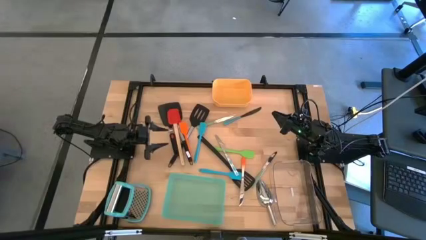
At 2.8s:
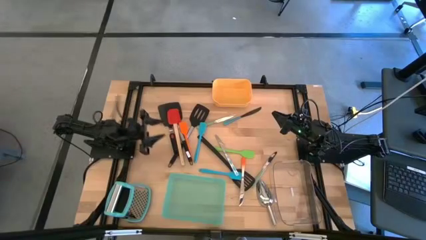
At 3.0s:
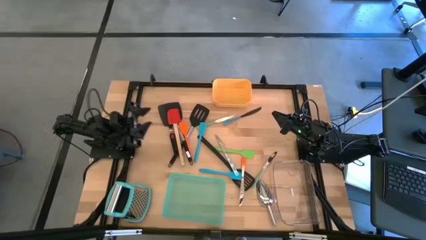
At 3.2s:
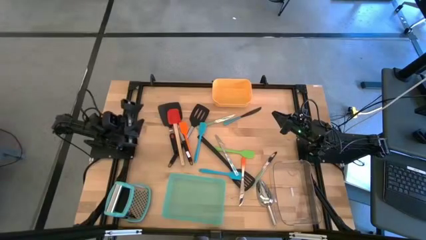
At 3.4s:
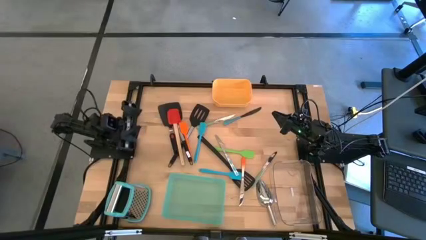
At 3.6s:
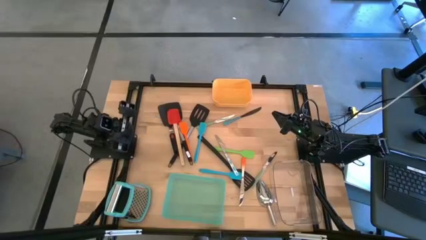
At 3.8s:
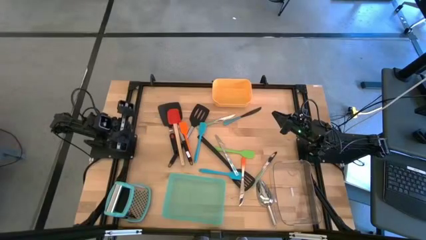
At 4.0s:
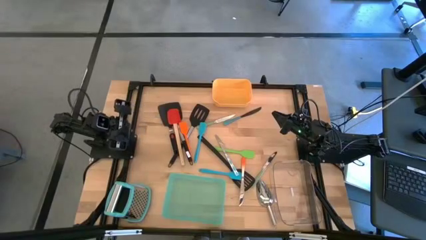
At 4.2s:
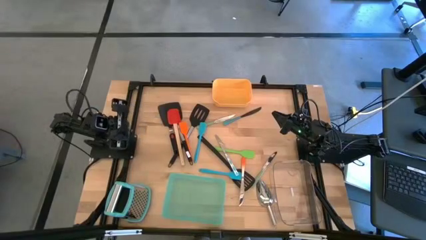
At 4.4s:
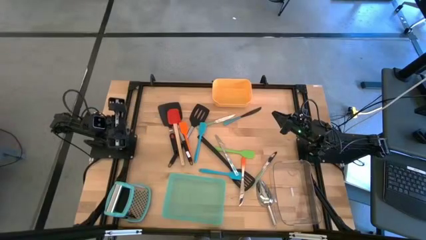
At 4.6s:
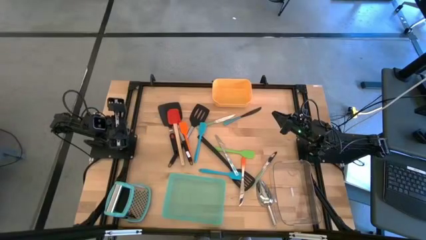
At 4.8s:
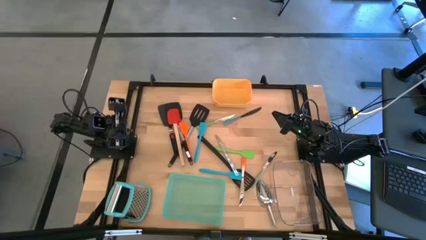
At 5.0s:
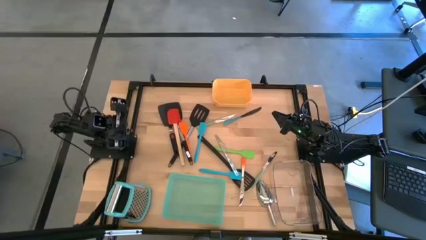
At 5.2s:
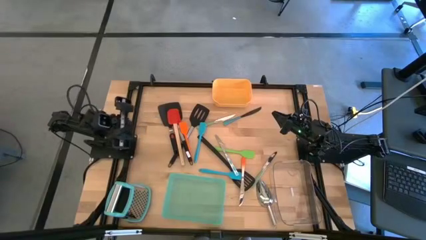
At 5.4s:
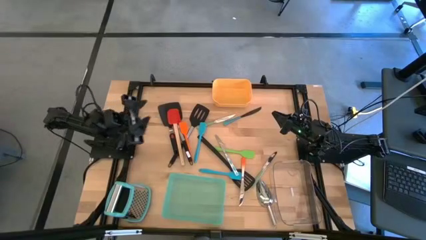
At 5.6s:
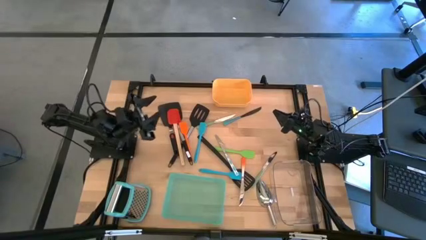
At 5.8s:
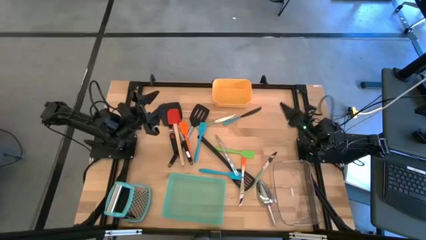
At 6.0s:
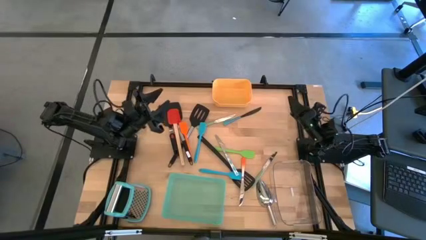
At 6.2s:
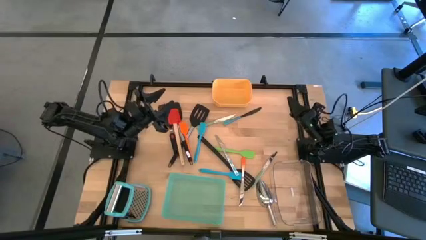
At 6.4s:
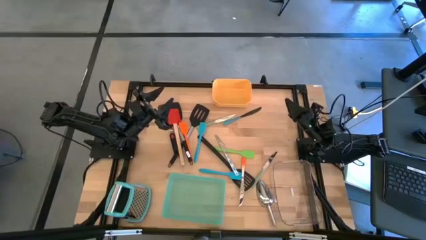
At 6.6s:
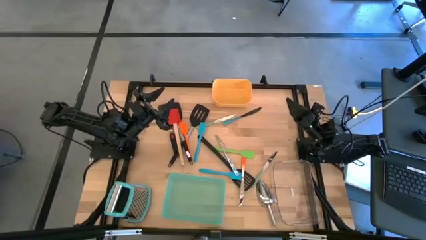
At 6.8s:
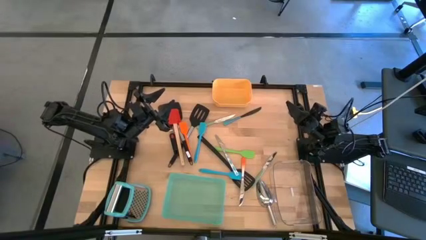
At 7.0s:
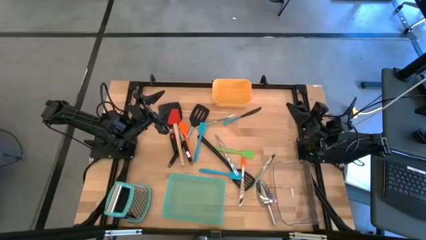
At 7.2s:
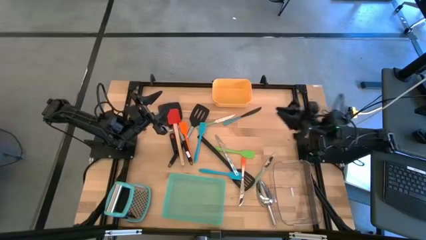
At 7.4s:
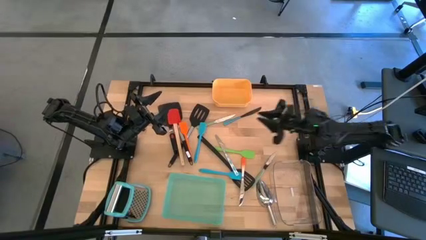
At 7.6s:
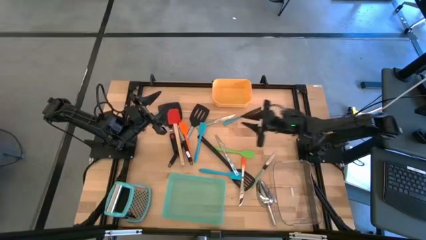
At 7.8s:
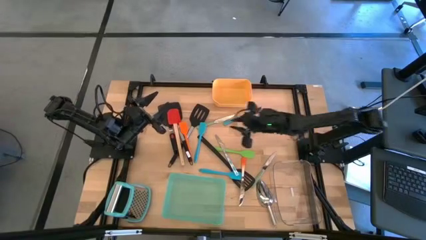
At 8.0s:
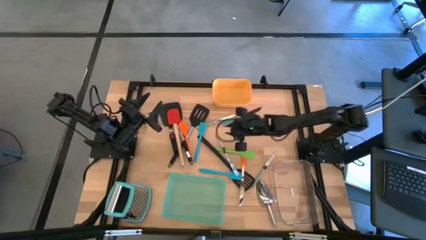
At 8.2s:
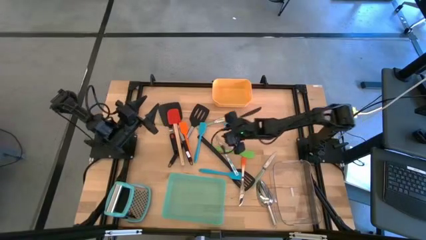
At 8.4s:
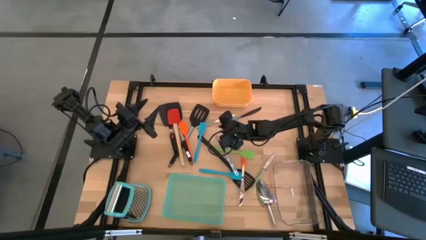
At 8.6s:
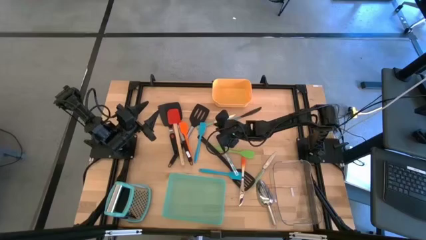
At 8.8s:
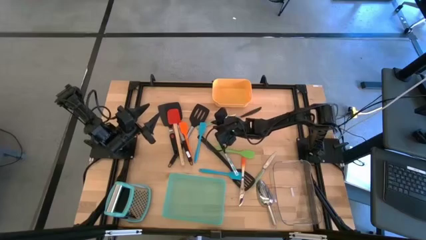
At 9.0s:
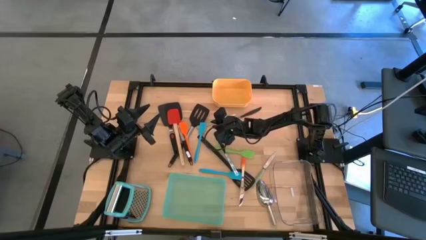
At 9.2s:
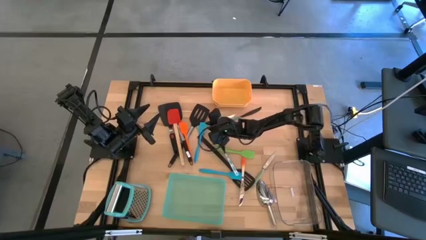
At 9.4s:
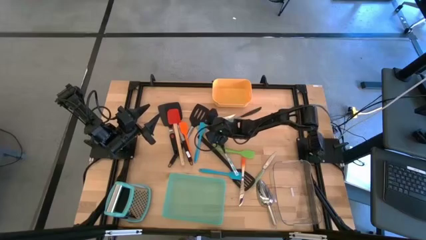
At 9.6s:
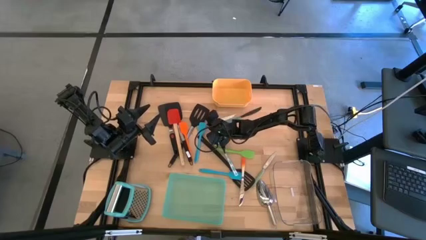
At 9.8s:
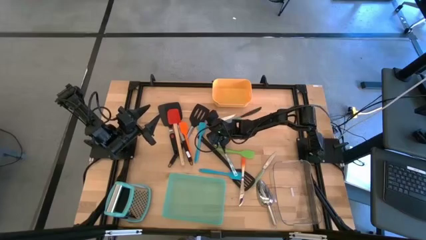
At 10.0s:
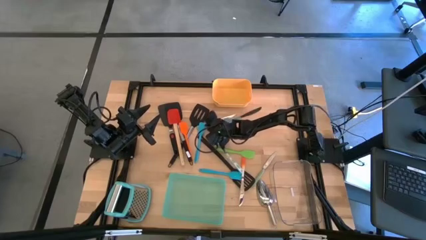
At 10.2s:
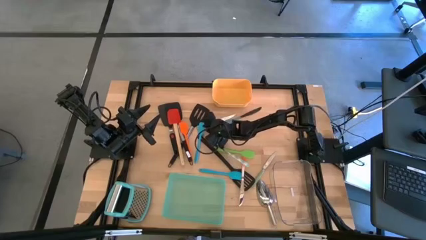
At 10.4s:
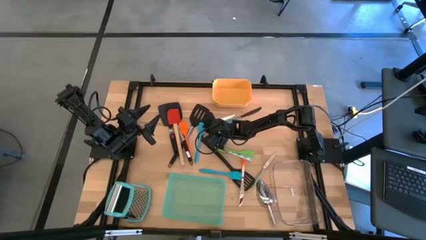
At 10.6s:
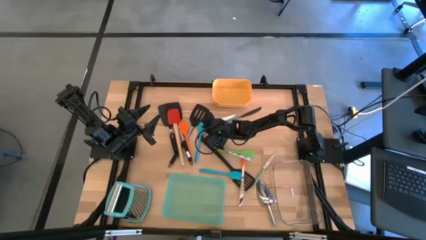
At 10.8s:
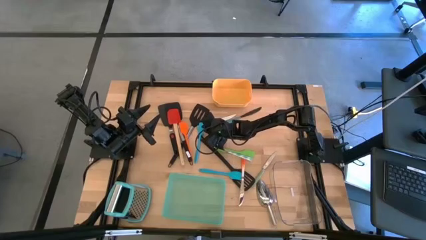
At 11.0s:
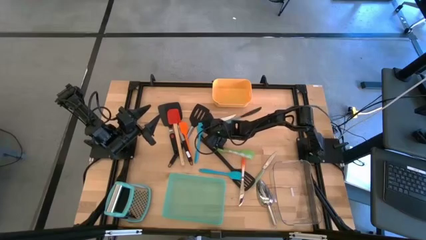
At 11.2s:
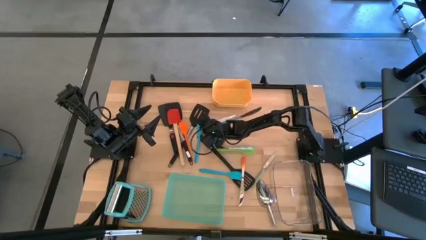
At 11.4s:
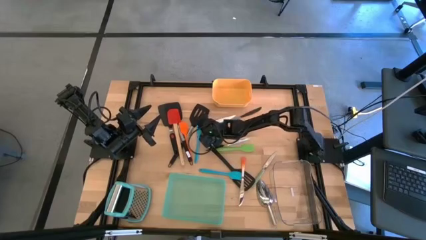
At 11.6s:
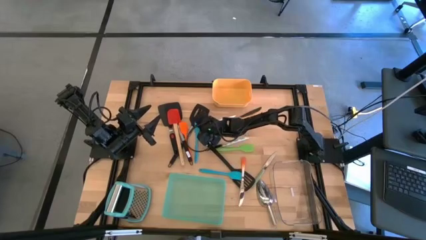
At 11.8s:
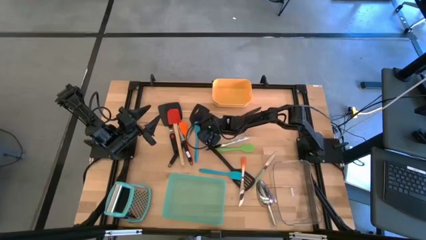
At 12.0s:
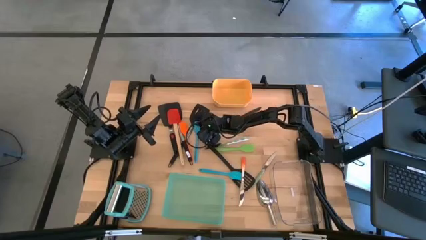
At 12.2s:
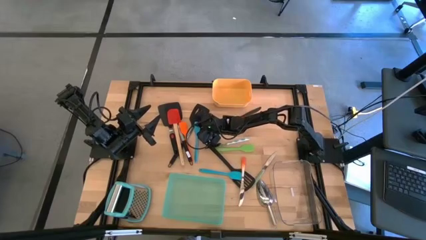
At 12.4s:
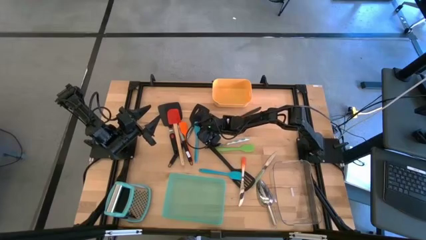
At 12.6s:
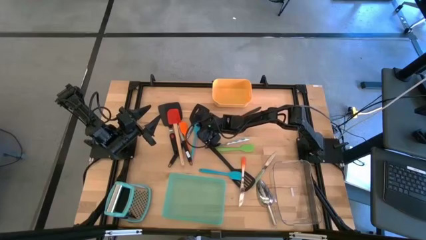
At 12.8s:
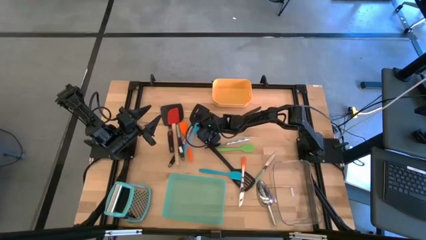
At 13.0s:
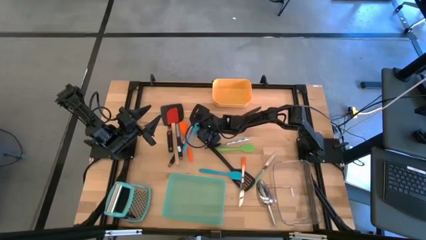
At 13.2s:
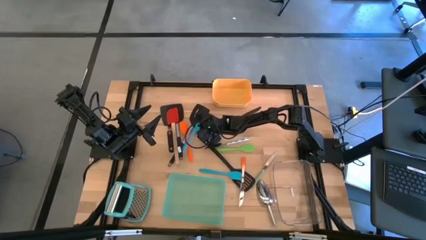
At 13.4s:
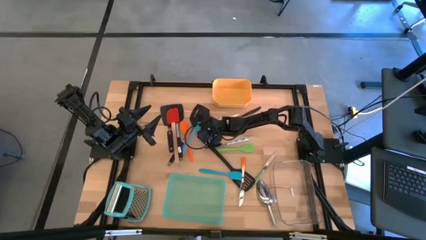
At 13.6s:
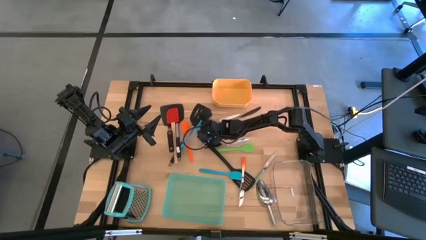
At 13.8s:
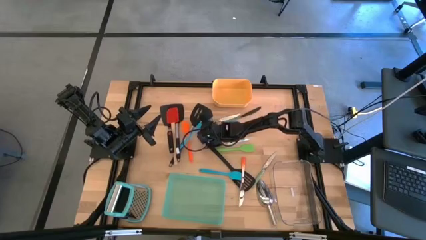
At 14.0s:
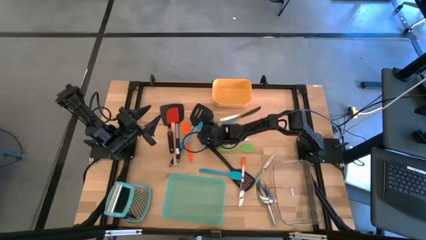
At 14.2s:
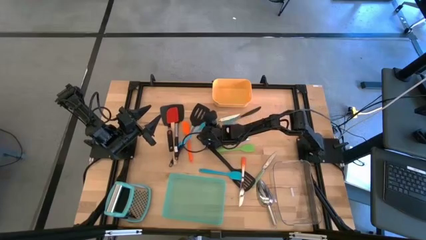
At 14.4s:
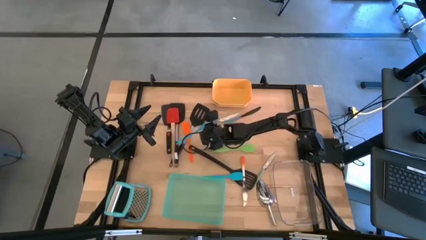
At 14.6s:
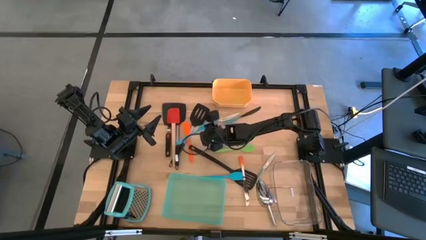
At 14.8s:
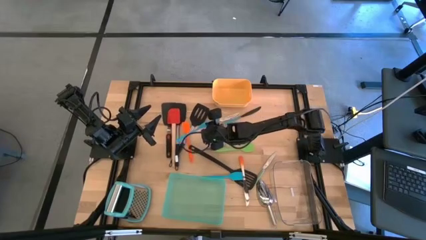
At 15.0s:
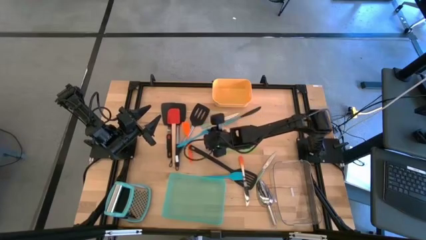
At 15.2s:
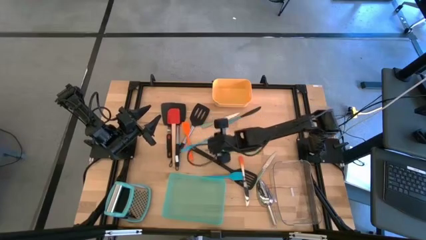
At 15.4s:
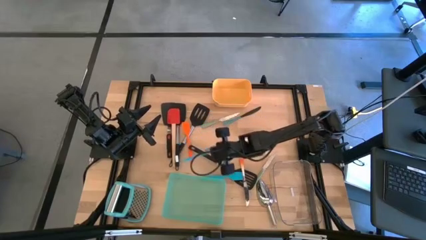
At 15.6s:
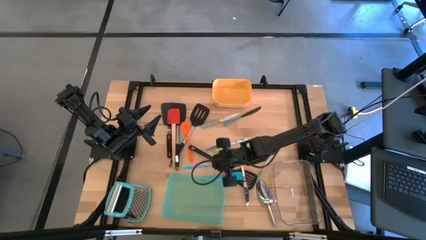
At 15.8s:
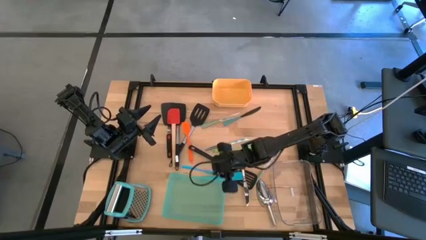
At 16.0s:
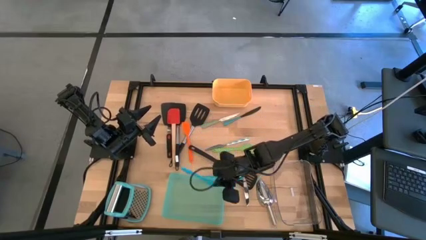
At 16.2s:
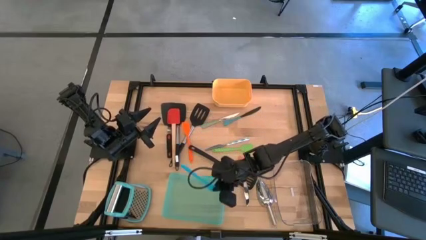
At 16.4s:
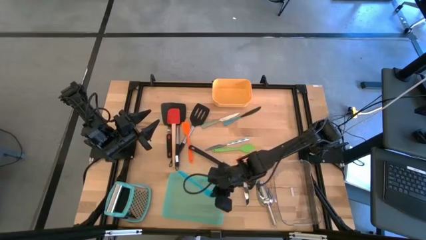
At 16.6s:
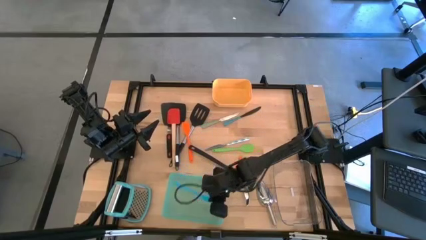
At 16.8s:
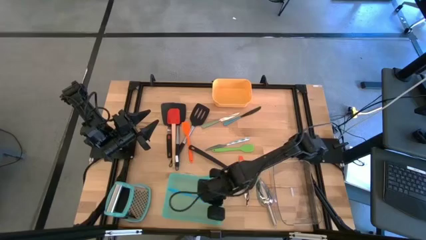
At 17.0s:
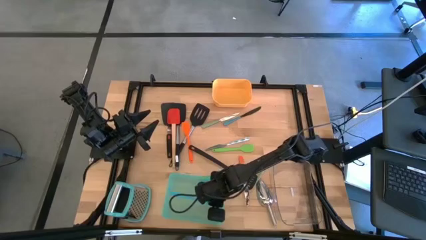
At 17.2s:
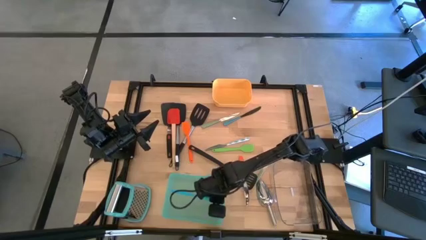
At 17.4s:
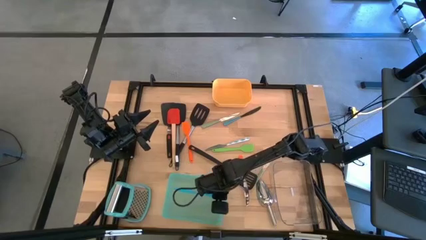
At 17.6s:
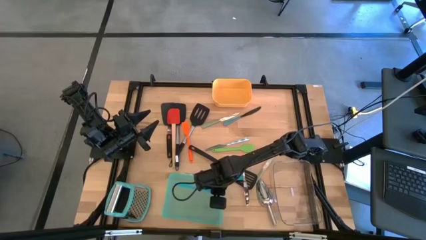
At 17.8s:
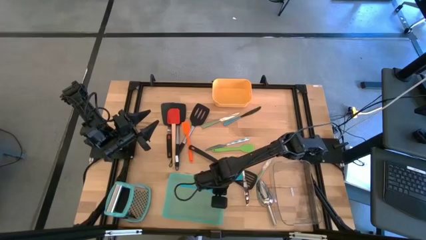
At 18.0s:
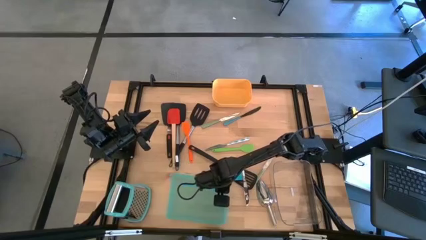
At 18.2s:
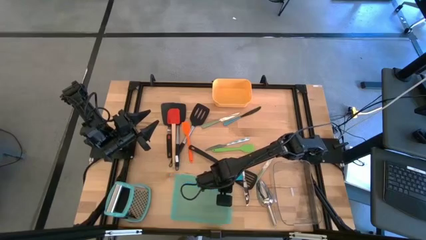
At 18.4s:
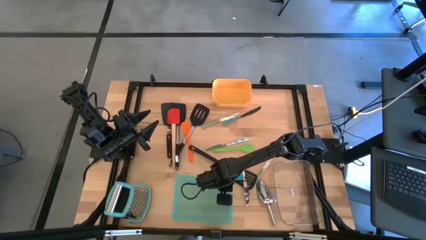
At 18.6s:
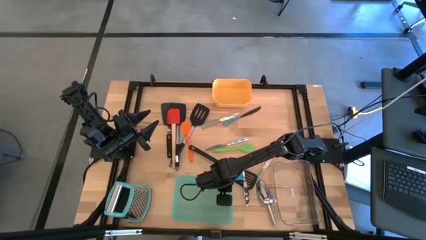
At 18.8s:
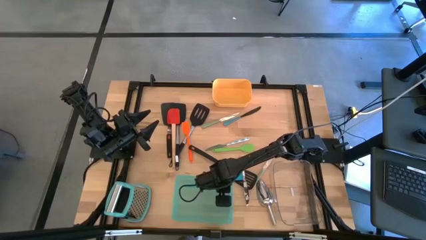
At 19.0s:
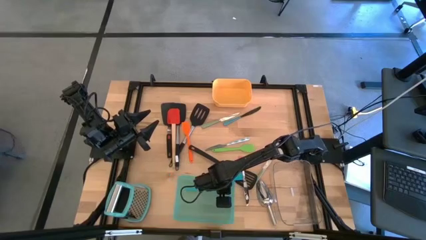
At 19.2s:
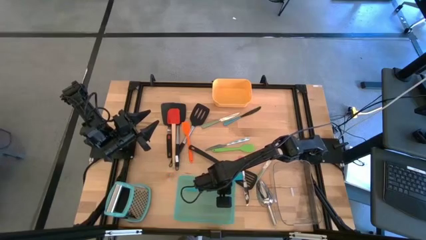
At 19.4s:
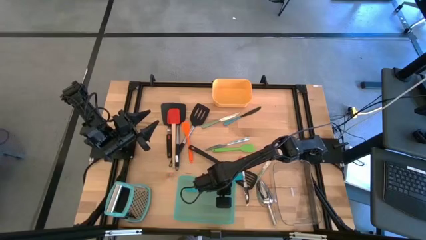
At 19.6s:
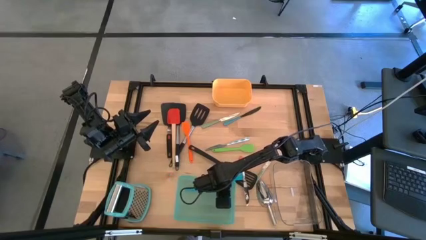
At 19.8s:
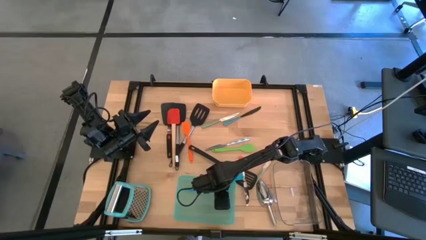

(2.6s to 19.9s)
Task: Pick & Place Kitchen Items
Put the blue spatula into the blue bin
